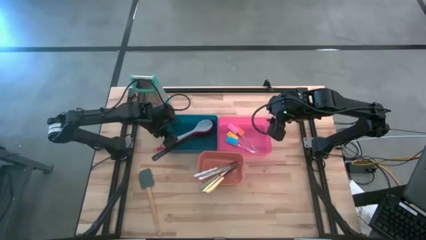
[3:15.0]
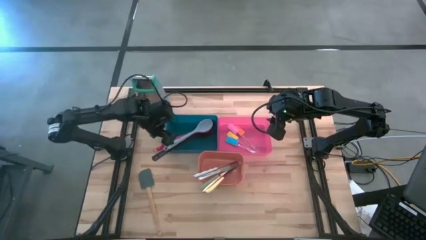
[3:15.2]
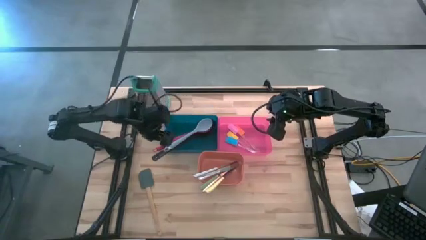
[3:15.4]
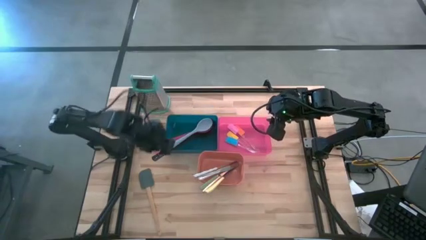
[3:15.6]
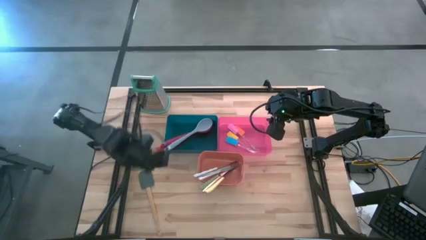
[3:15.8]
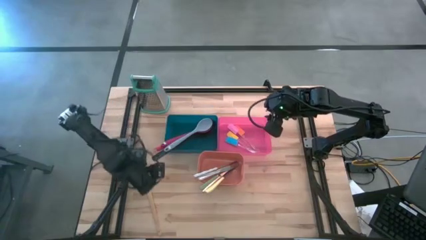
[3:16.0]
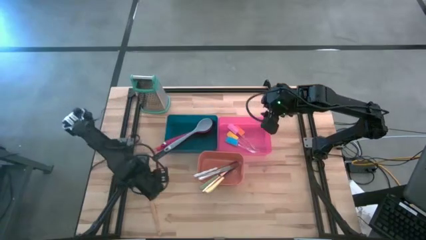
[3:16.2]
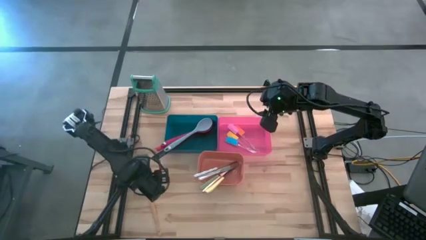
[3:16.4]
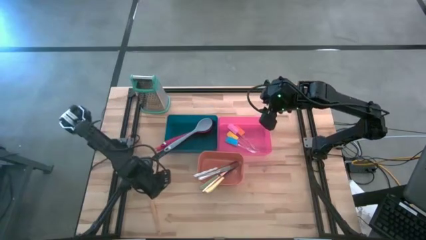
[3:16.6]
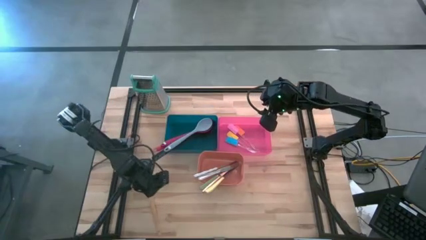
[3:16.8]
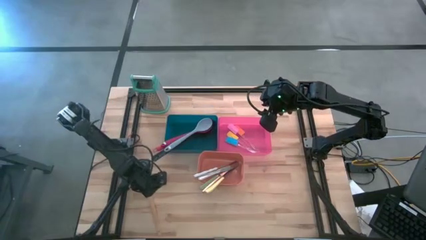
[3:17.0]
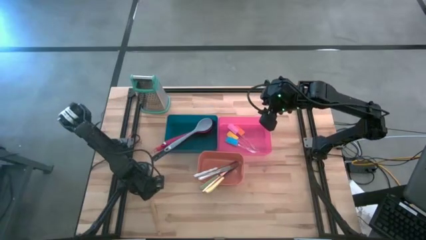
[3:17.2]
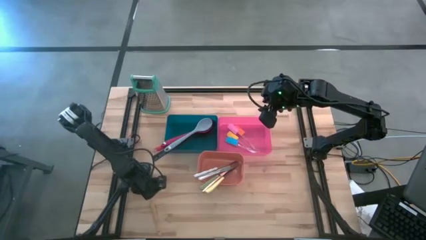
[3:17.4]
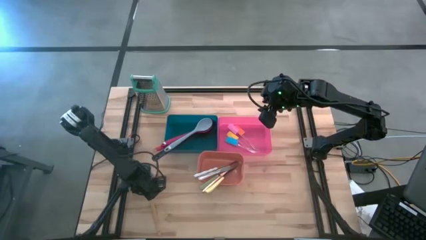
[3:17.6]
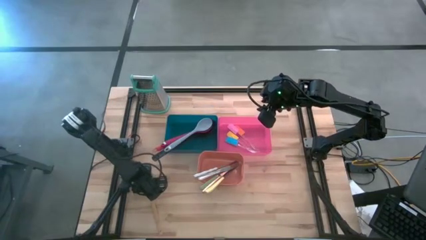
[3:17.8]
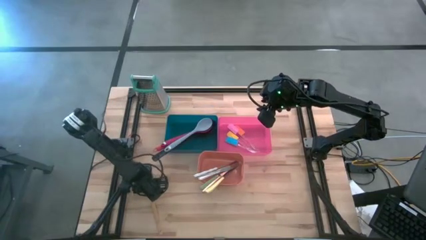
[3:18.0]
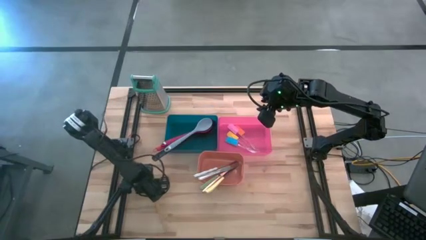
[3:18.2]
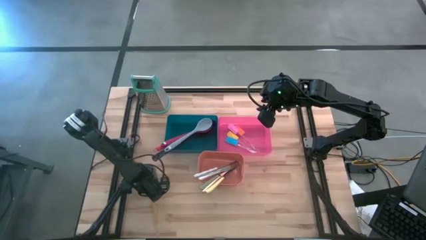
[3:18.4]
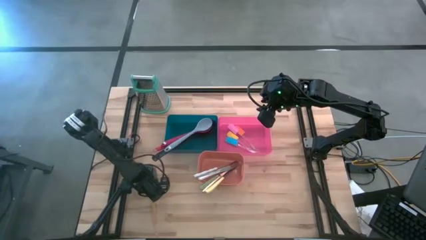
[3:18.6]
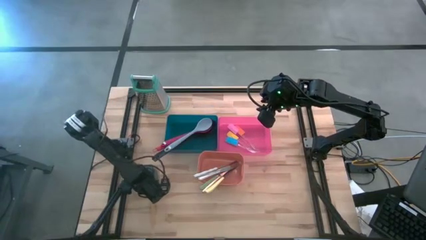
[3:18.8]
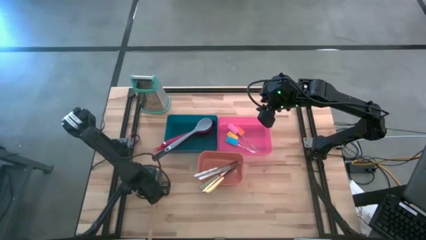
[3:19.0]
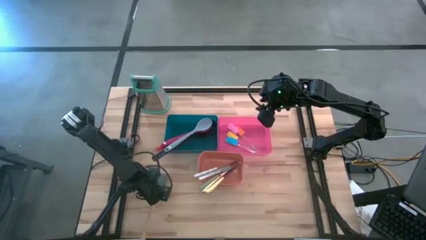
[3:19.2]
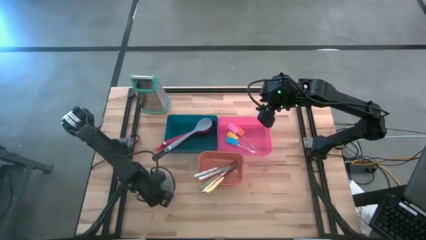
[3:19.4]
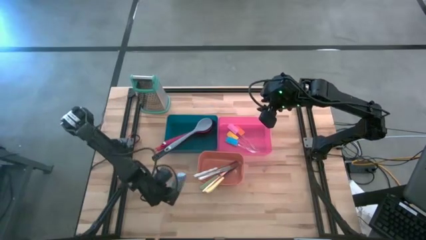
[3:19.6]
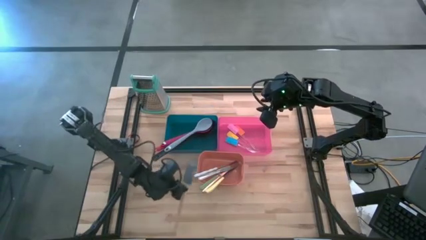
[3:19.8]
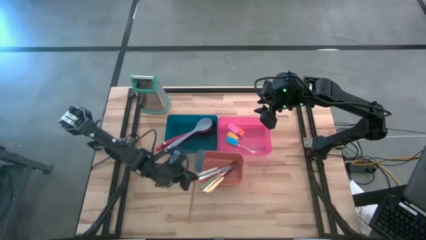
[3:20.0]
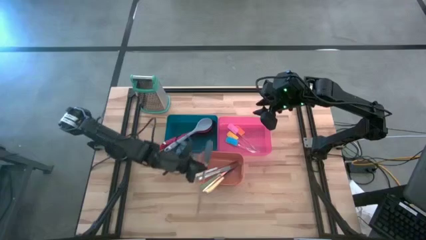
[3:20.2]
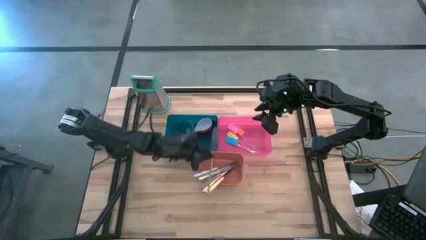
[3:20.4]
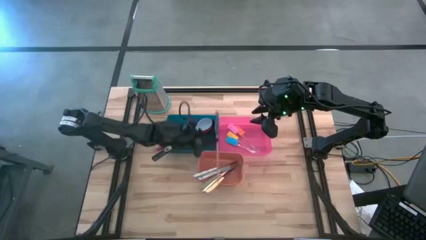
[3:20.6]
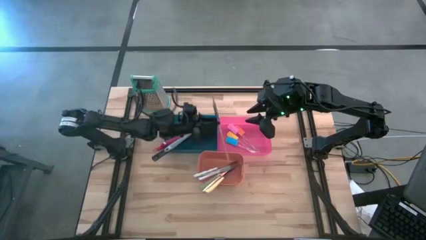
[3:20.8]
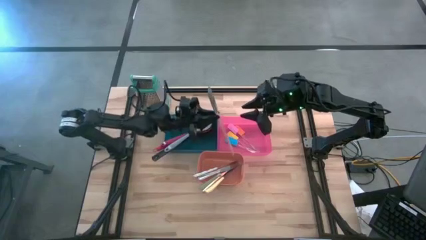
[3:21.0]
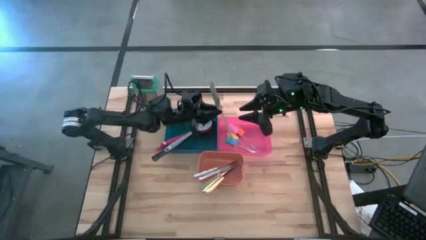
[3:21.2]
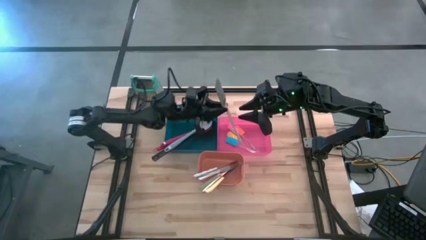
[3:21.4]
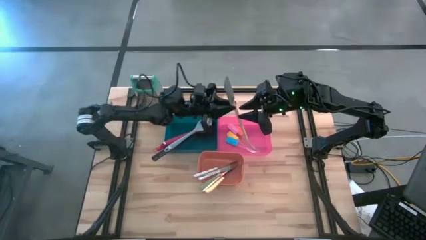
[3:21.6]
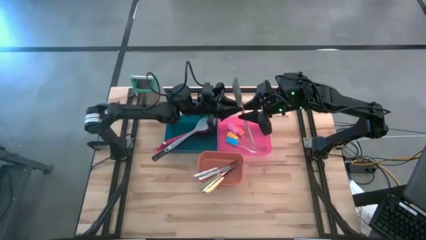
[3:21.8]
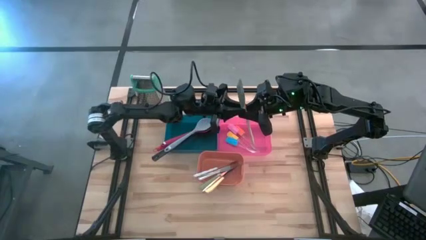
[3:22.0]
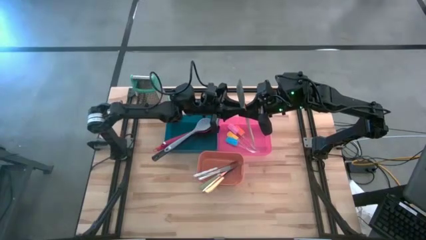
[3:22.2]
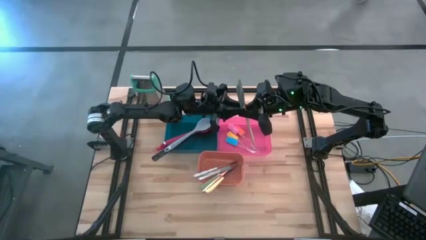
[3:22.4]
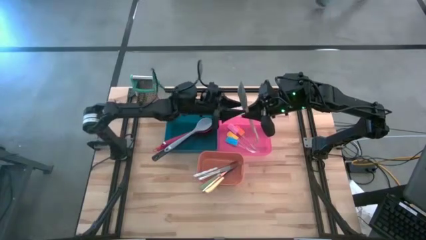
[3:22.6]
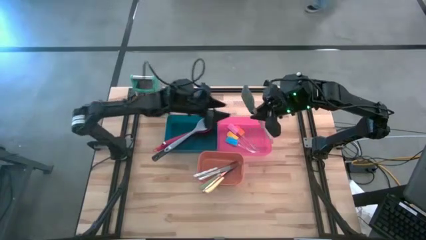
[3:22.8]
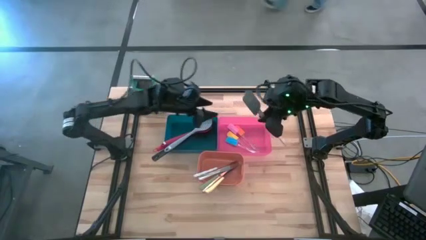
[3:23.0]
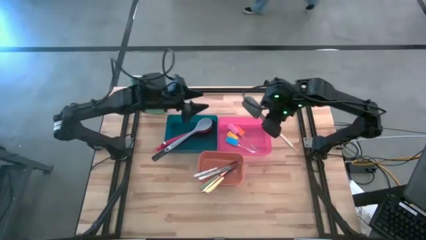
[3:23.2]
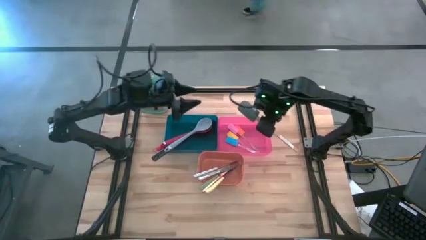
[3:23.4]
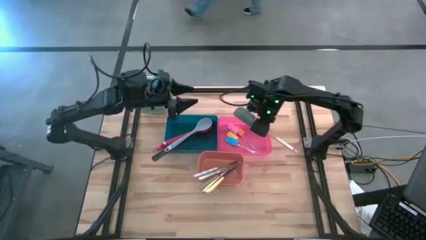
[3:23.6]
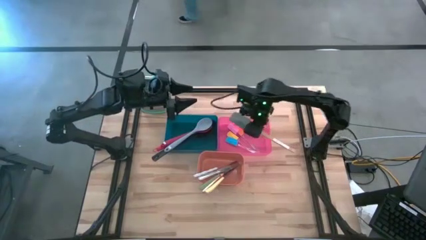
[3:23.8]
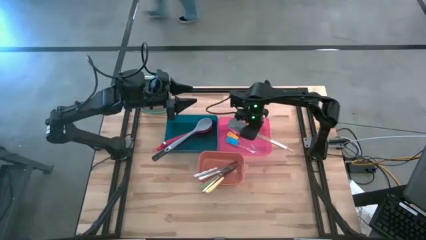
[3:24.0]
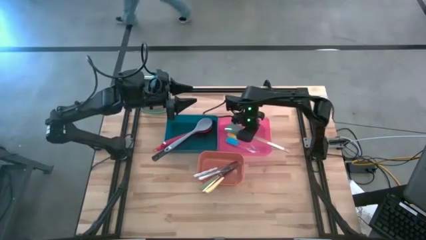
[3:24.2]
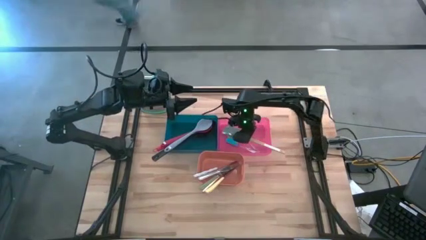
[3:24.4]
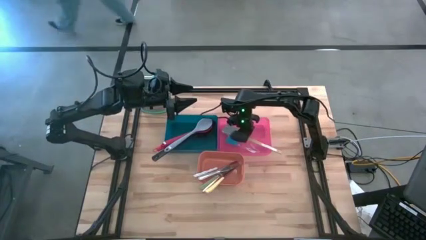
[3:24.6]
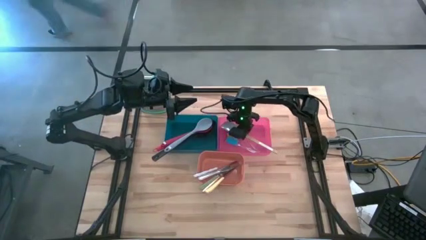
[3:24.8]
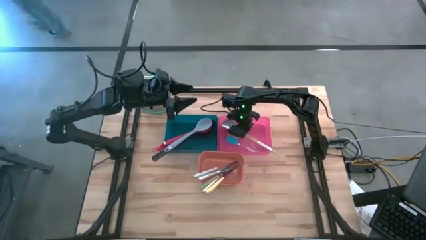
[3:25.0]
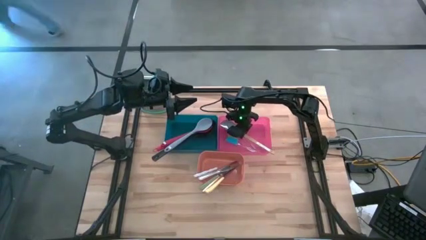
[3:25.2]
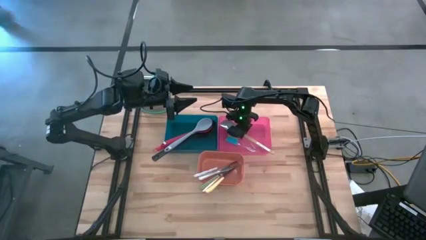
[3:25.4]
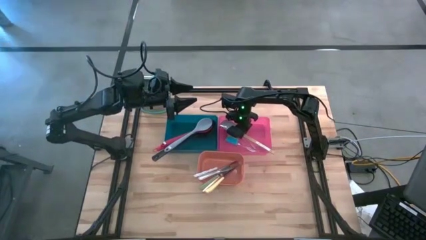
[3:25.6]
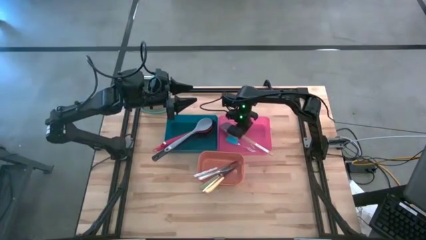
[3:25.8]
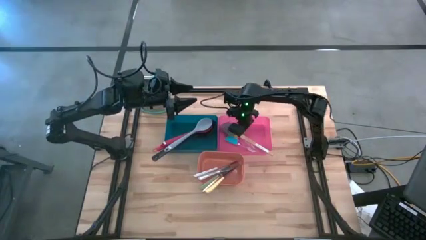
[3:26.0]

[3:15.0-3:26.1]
Task: Pick & Place Kitchen Items
Put the gray spatula into the red bin

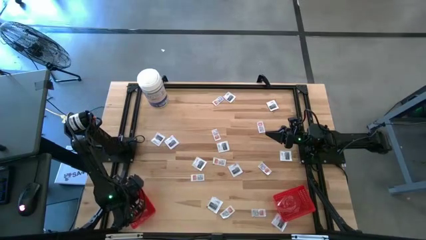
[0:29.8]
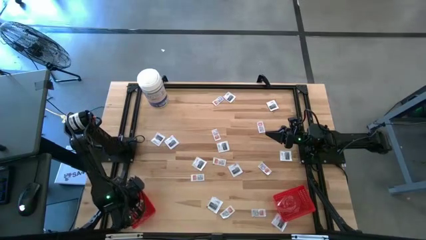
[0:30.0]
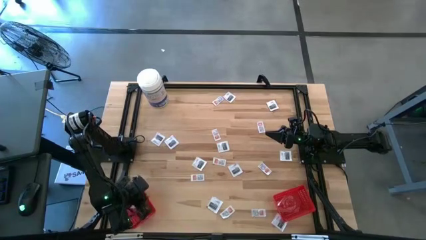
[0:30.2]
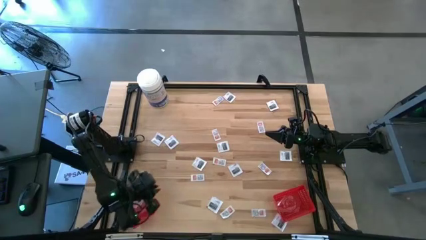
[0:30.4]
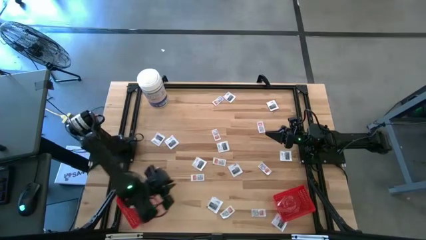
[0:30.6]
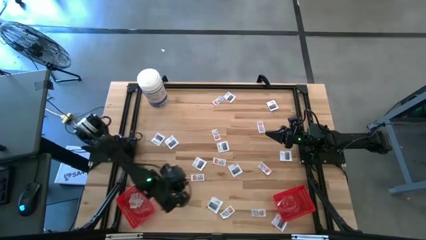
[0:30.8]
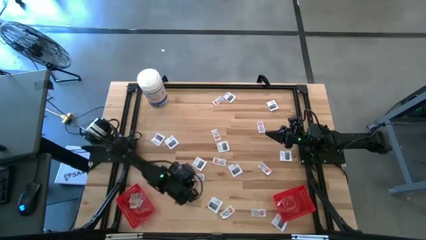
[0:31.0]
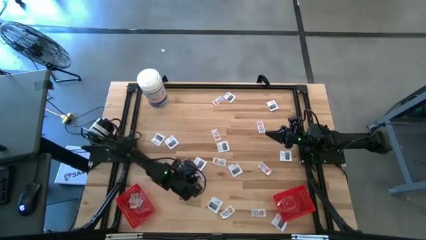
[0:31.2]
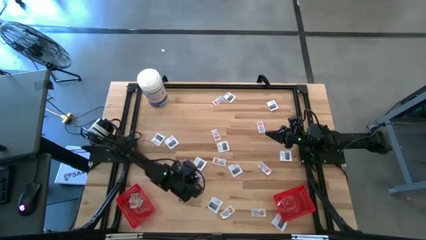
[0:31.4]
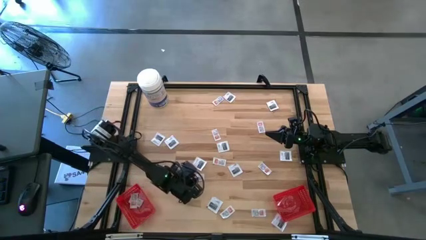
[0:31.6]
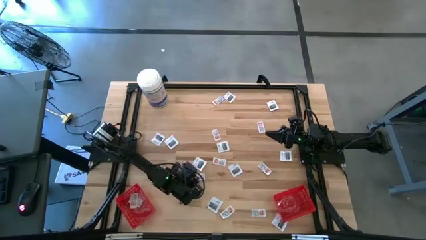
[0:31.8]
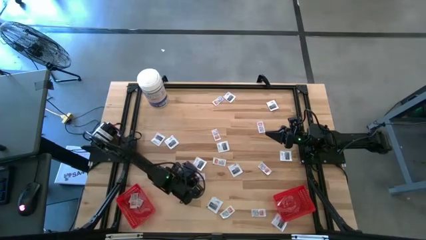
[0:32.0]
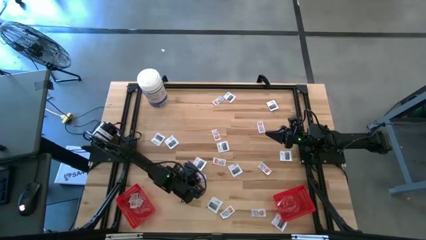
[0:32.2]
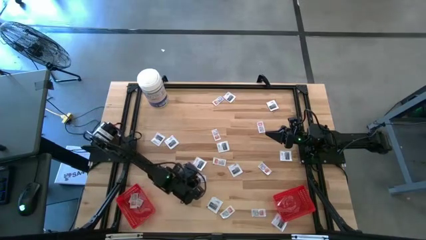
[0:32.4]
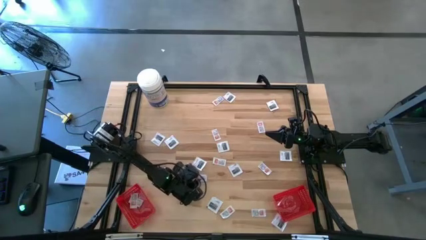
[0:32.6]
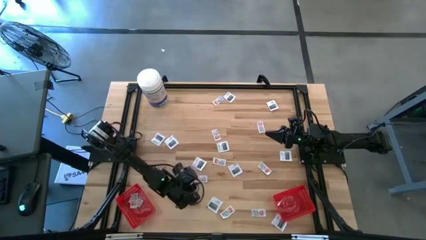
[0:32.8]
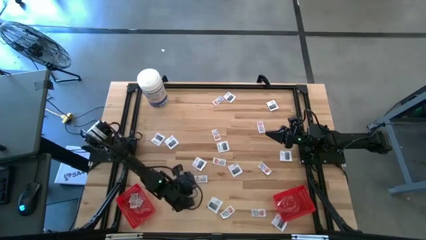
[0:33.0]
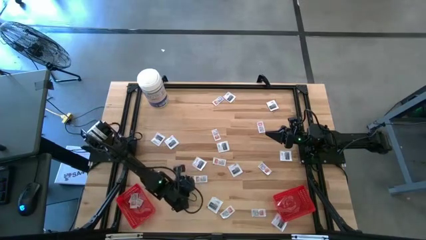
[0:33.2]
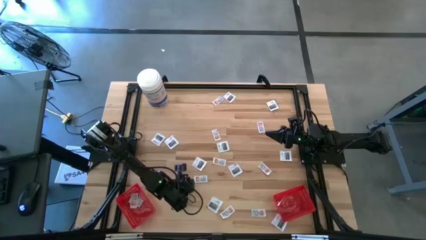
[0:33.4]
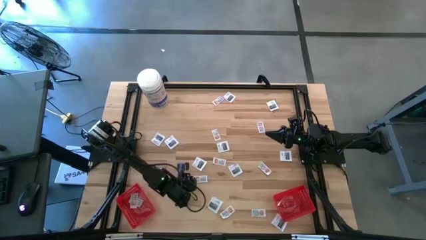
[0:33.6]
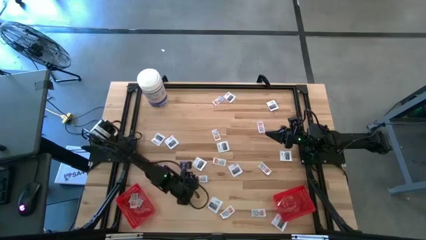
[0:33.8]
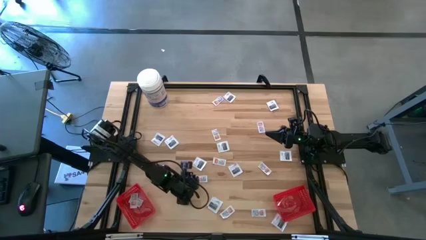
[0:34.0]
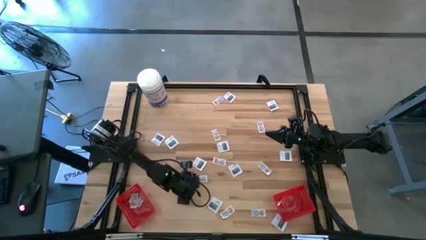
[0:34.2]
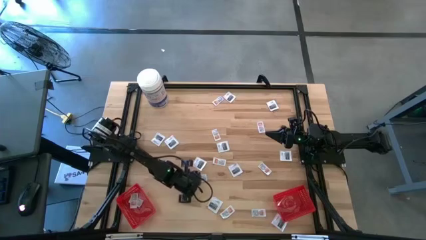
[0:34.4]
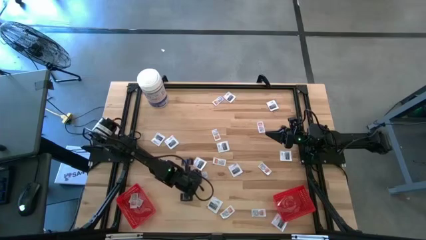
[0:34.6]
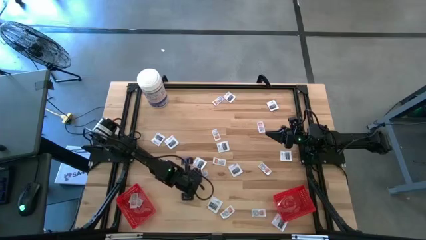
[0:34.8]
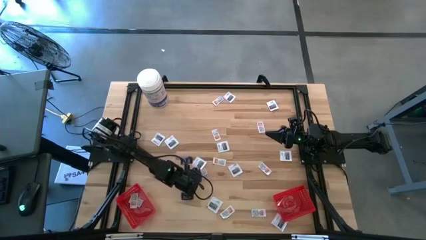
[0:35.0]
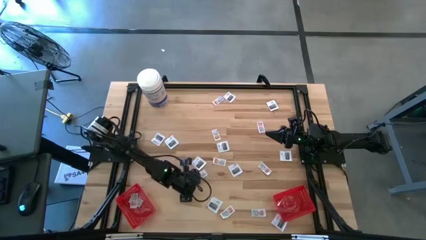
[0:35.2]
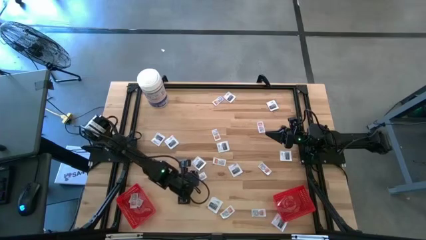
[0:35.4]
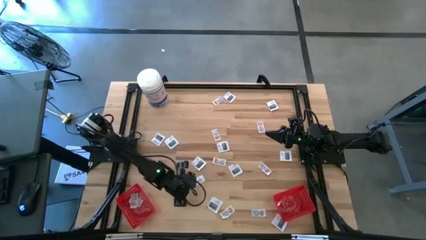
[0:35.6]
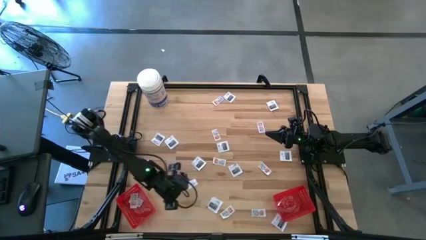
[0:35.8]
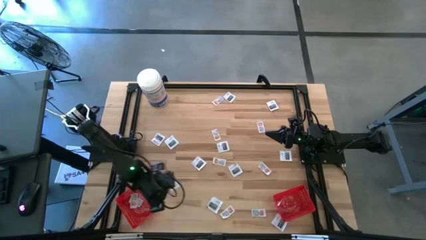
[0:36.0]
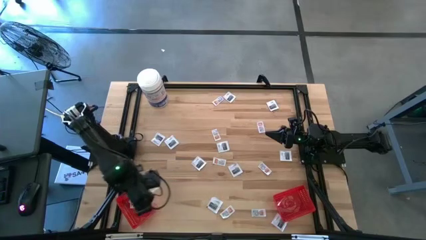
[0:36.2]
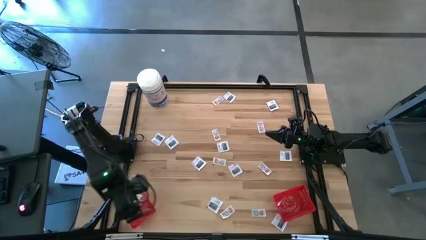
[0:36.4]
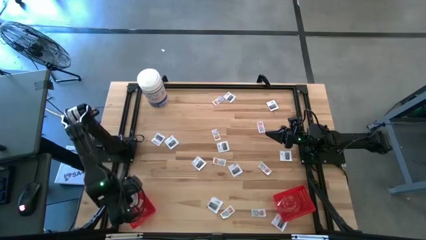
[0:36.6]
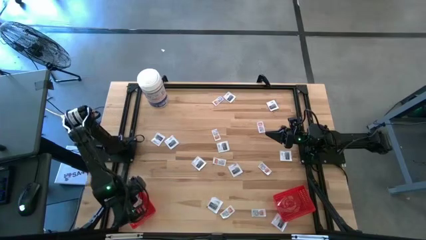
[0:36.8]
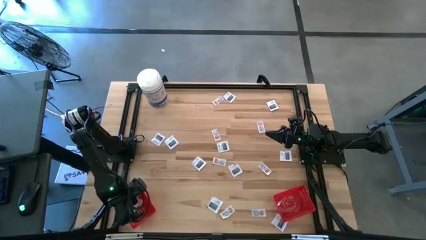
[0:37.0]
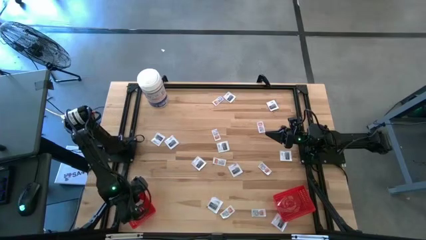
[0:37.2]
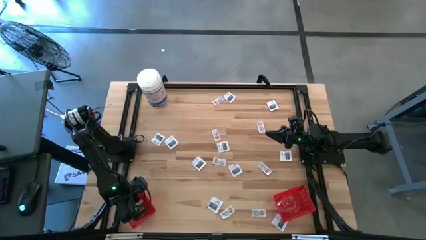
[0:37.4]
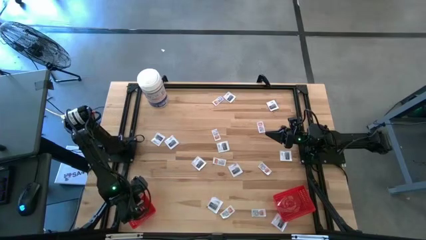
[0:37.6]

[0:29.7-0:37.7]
Task: Pick & Place First Aid Supplies
Put the ointment pack into the left red bin
